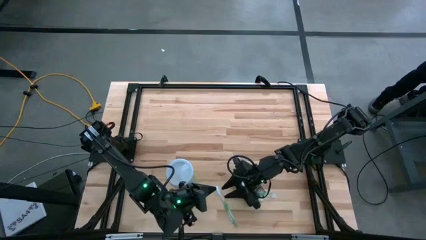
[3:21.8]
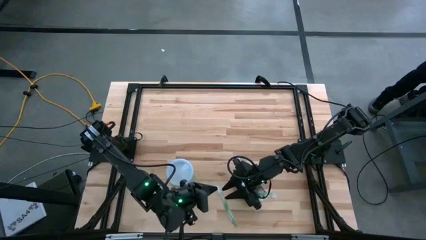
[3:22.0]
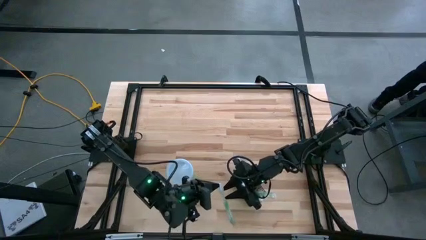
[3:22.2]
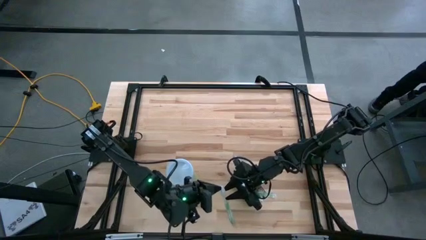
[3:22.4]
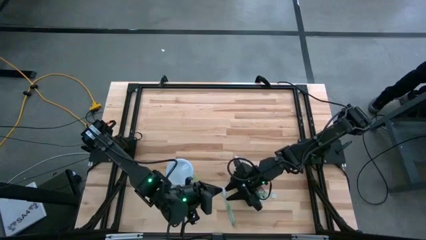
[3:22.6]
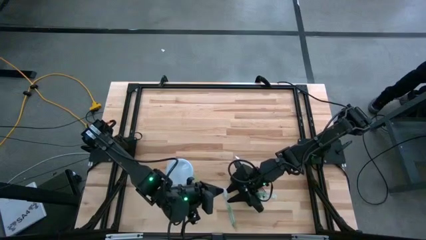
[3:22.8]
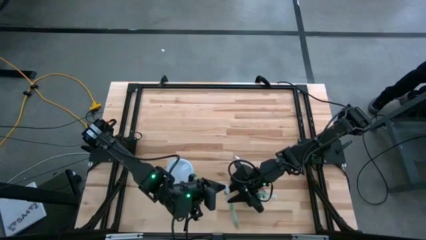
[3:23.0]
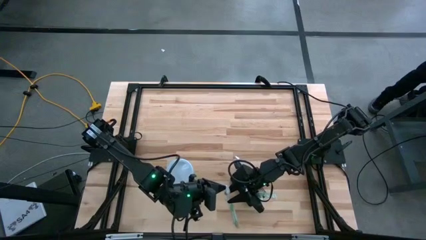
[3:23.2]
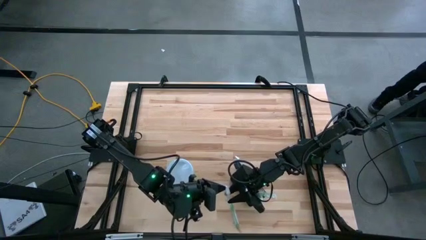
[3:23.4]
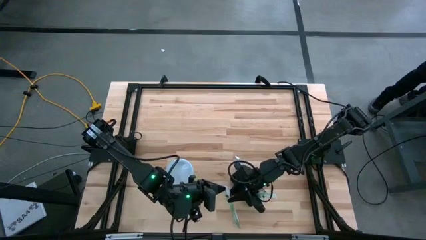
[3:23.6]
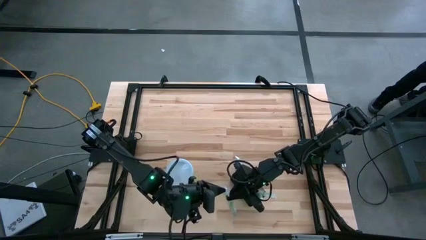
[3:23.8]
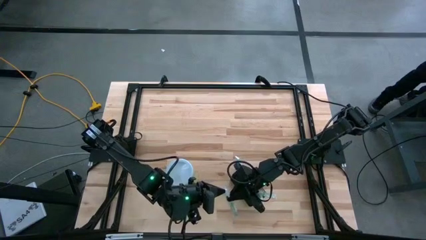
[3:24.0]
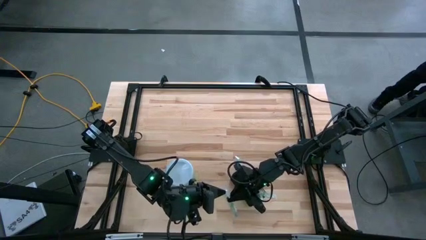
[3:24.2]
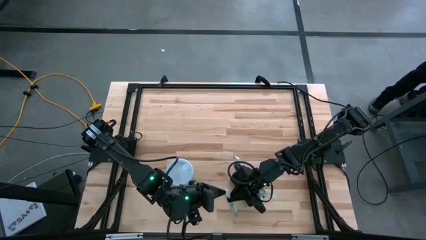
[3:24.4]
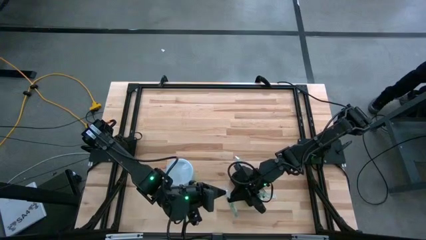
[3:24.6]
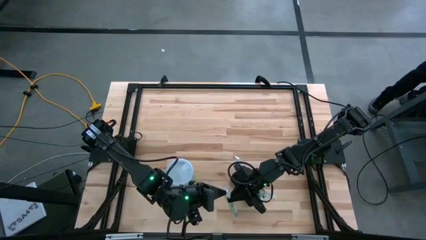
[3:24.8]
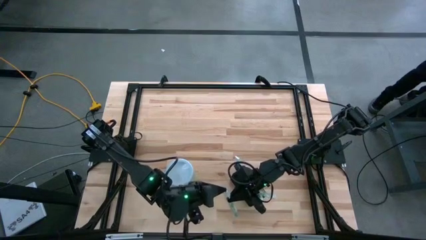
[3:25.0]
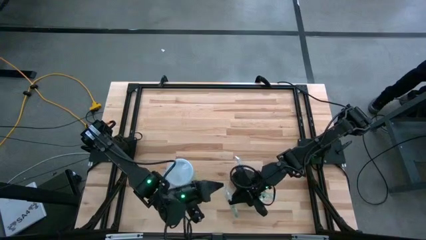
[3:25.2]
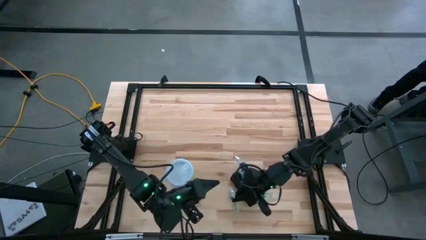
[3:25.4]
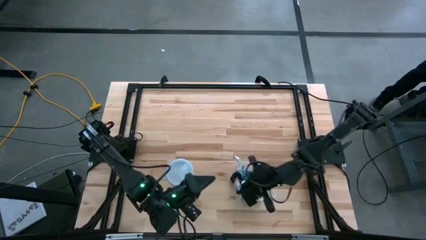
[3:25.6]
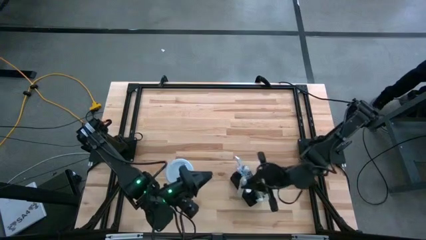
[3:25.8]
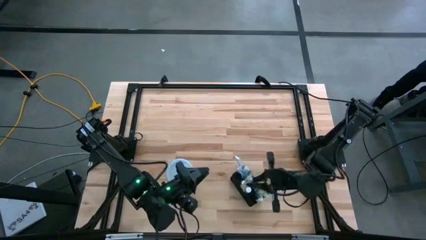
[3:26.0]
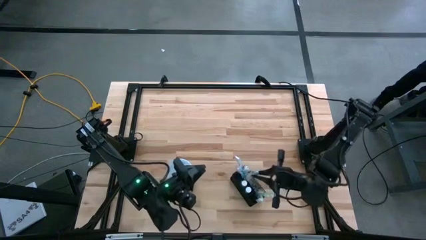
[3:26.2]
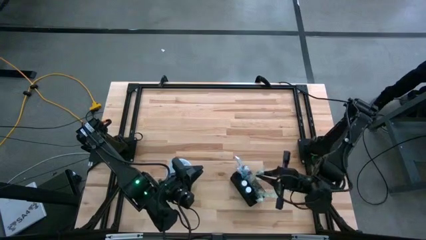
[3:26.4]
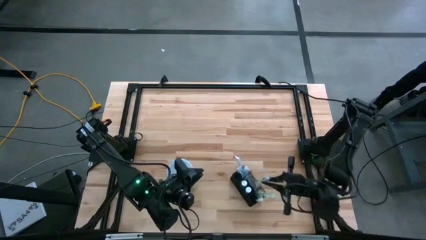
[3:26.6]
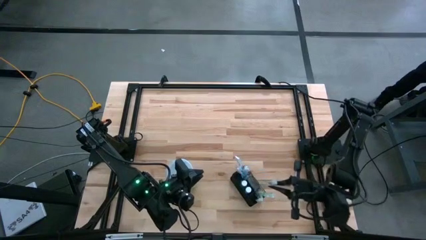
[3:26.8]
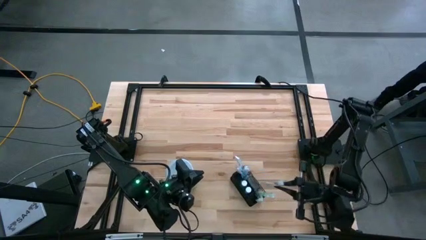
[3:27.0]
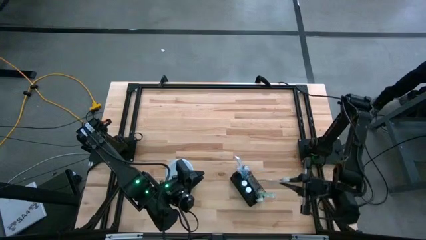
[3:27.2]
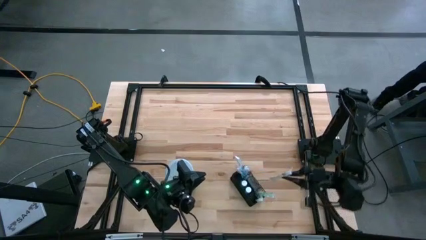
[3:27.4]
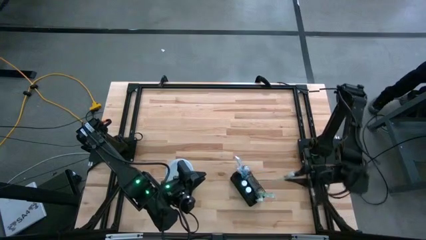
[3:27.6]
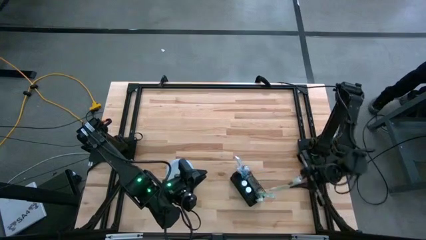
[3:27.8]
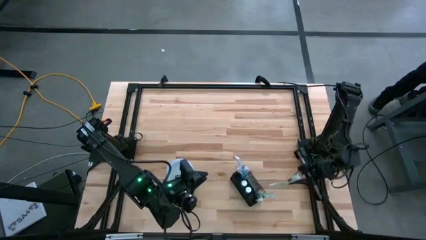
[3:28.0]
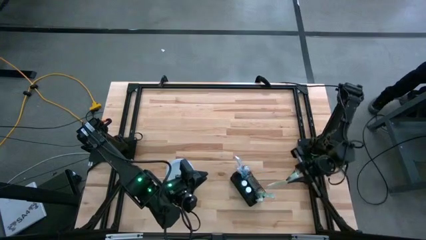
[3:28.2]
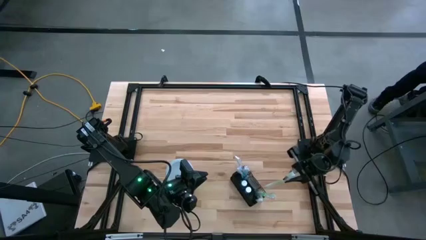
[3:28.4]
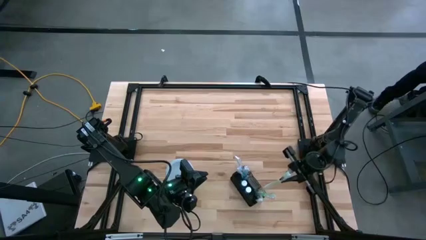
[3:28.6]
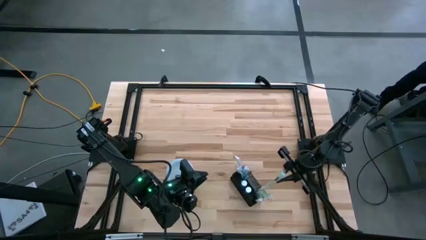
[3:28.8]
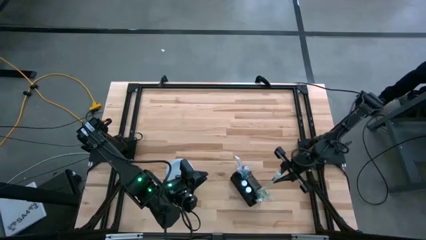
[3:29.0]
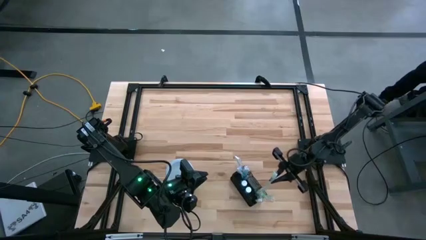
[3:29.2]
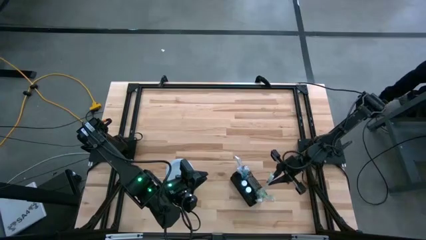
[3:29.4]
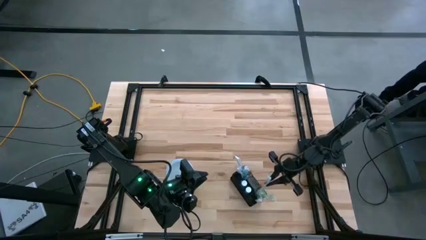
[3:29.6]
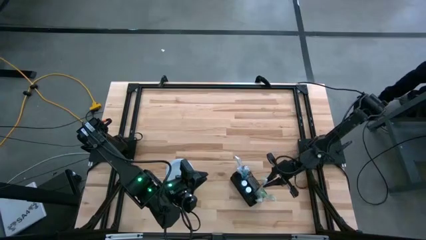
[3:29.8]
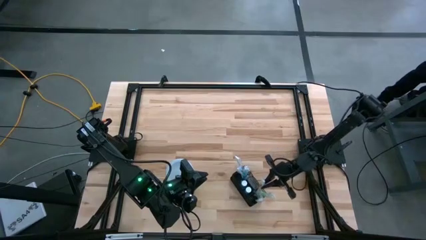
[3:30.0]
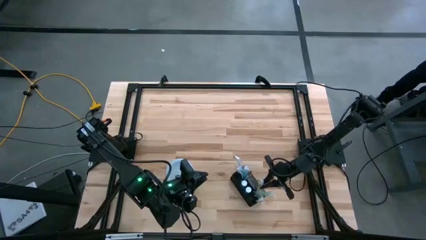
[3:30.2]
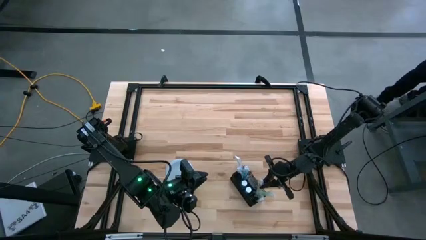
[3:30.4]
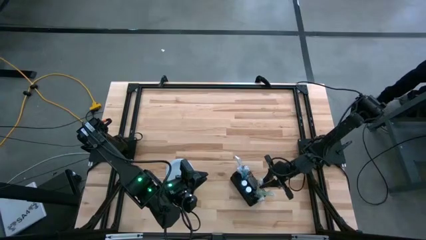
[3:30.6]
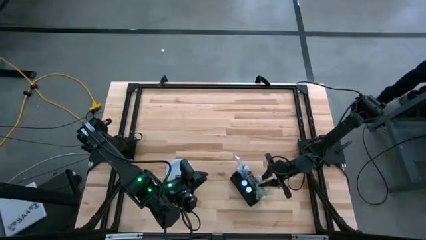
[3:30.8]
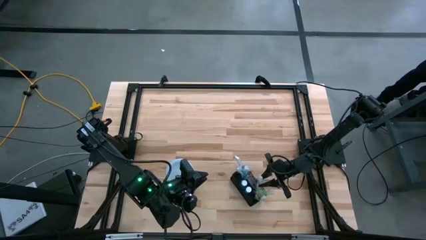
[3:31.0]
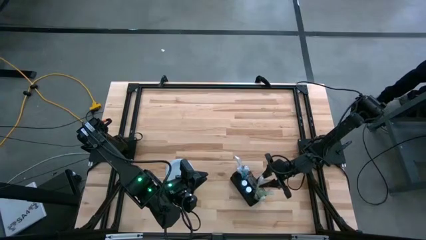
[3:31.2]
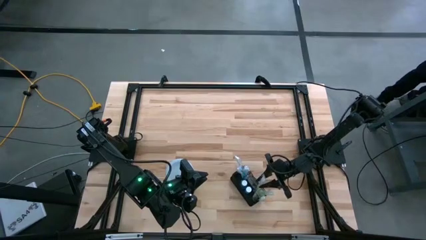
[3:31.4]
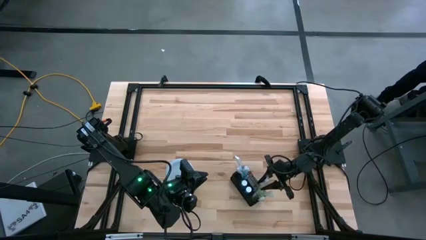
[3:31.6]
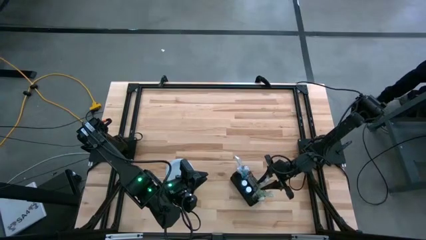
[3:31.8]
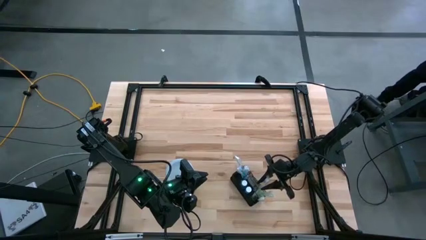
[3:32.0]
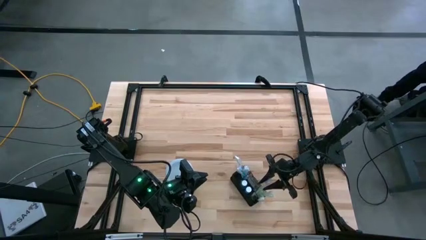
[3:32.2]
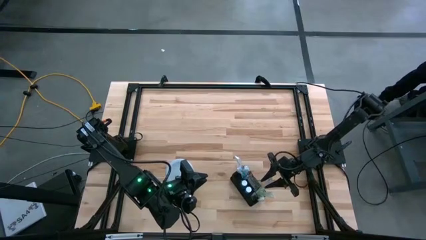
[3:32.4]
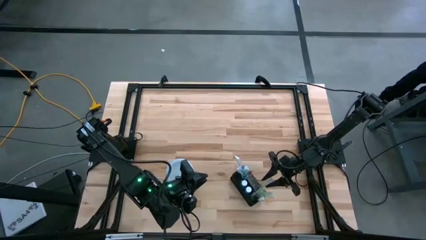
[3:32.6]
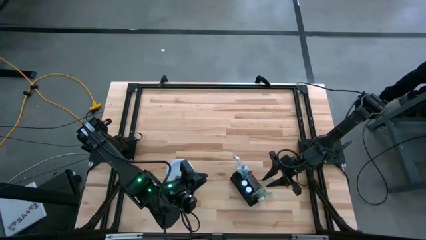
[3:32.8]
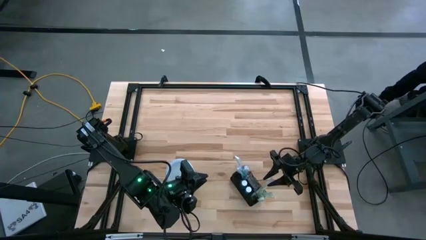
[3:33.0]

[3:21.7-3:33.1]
Task: Pick & Place toothbrushing station
Put the green toothbrush into the black mesh organizer

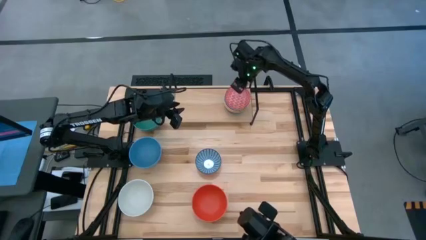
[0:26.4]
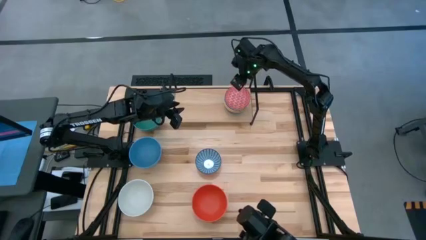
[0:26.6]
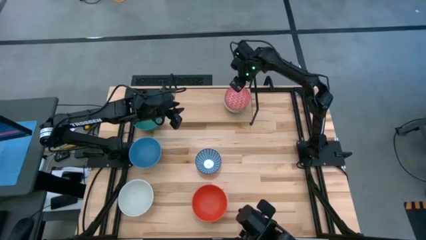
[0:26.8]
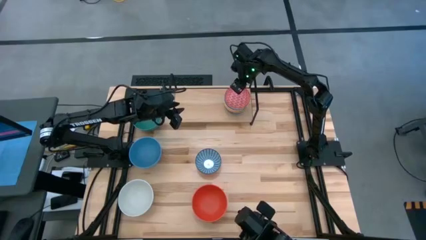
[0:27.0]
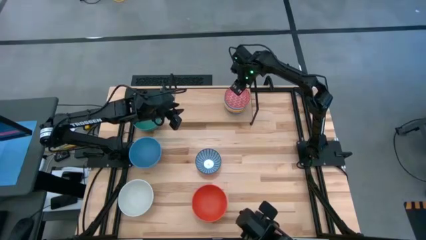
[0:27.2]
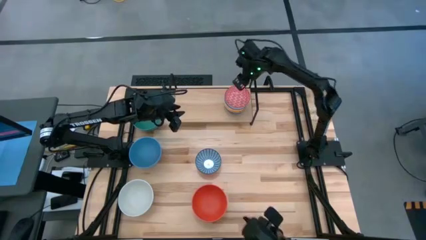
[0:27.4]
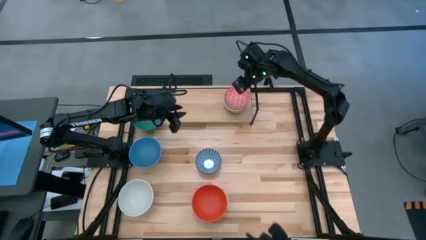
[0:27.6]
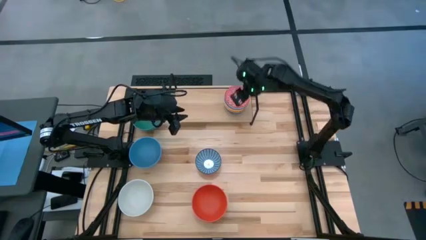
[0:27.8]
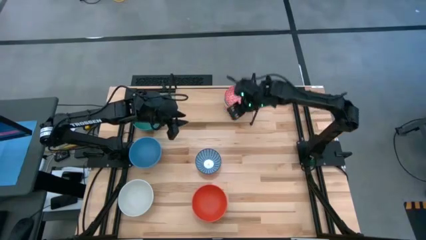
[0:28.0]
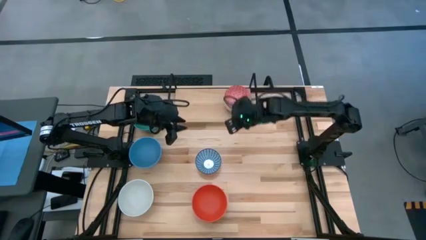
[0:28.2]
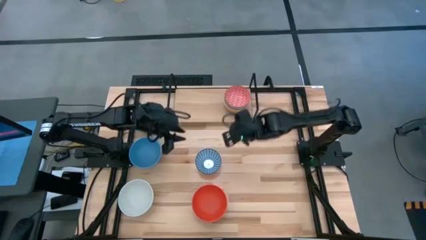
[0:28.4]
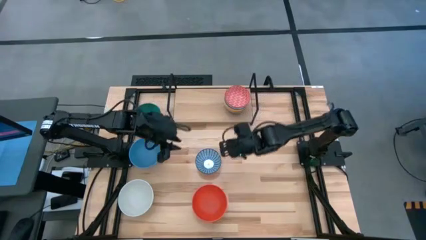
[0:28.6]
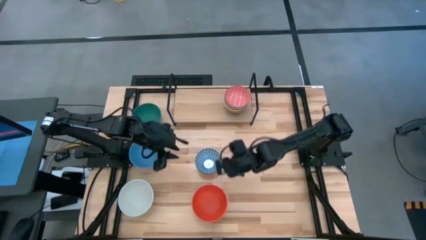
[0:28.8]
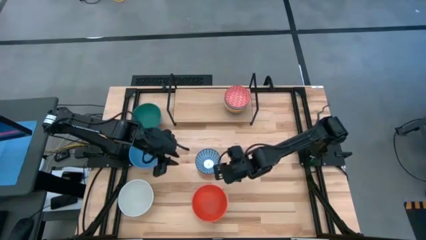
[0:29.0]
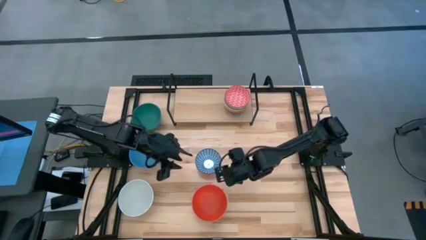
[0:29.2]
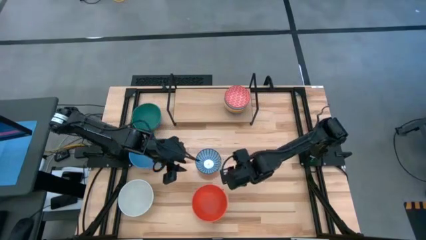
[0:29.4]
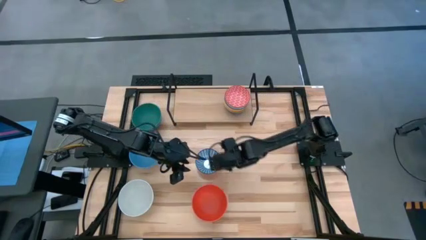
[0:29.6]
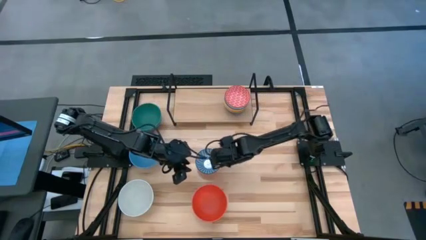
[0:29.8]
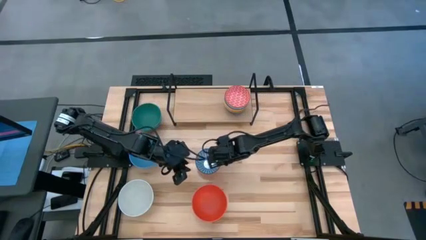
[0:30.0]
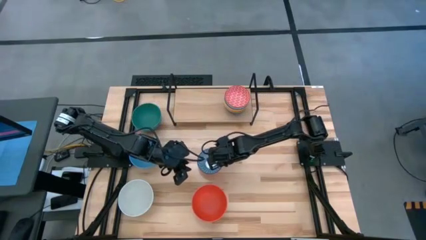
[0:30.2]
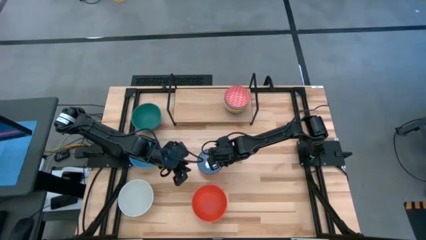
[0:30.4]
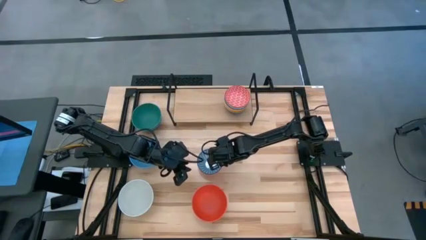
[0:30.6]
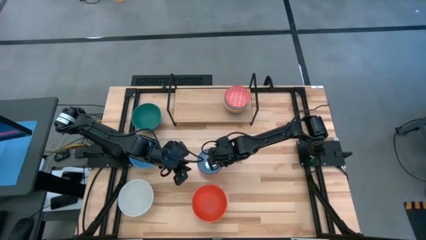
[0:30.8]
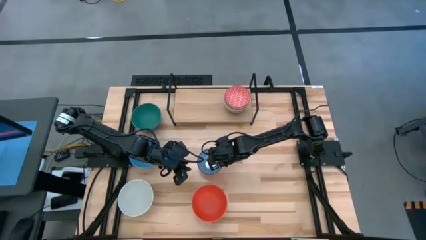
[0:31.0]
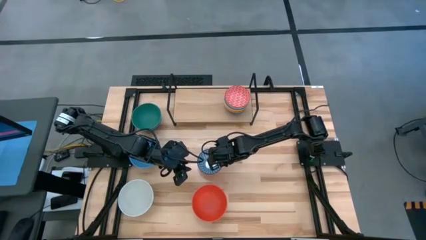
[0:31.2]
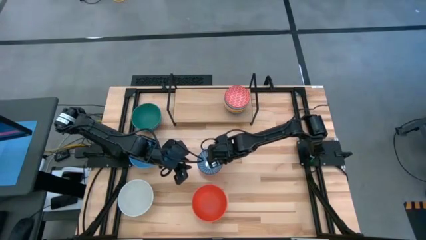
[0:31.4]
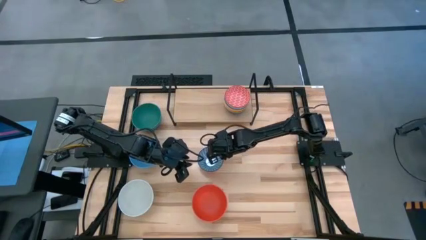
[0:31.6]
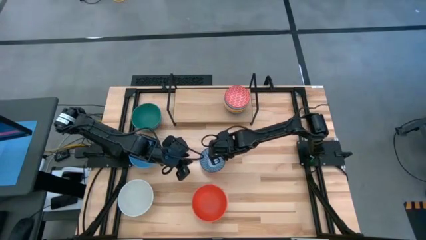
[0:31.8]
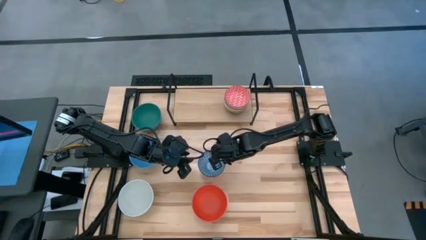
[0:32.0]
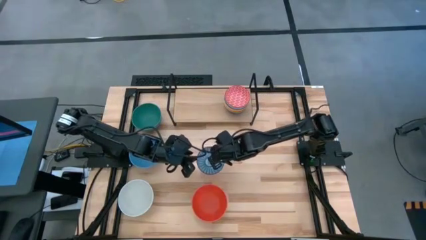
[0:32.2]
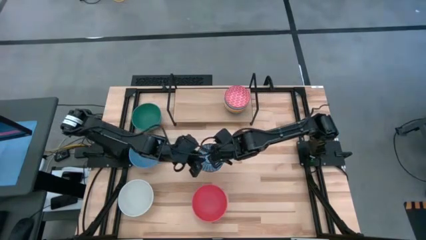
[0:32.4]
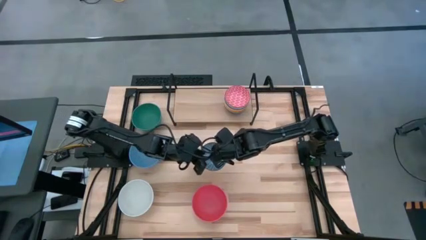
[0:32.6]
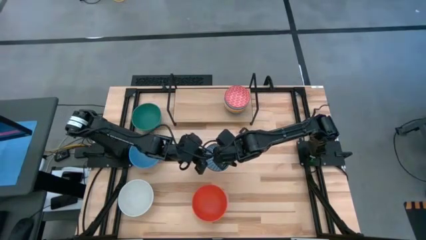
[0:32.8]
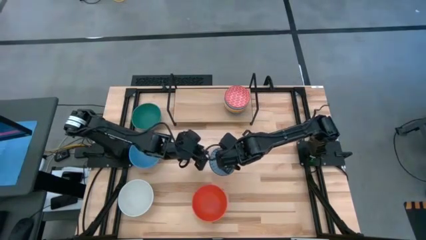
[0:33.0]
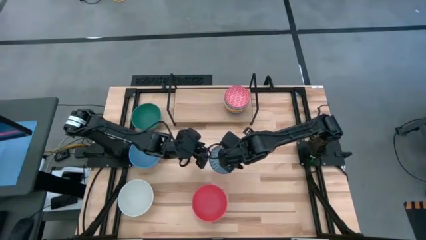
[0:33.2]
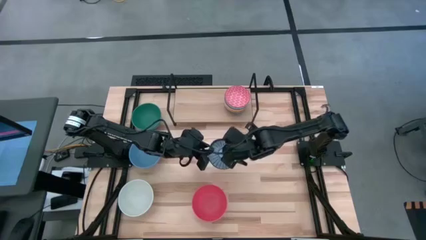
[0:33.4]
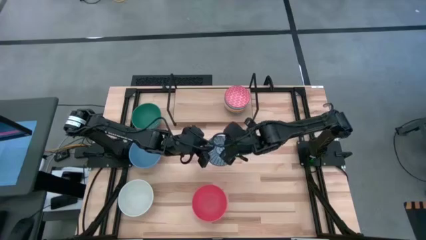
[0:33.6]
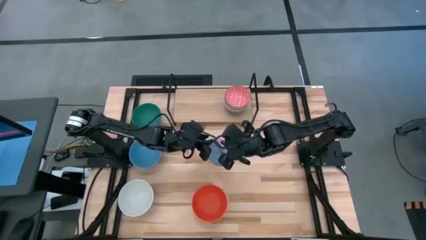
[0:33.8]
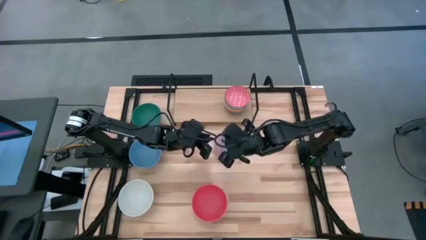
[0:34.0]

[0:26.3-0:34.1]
Task: Place and stack bowls onto a shelf
Stack the dark blue patterned bowl on top of the red patterned bowl on the shelf
